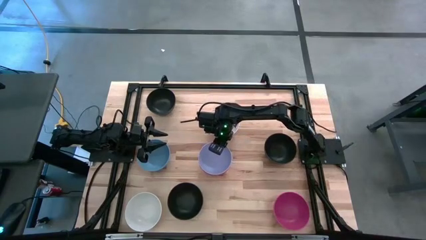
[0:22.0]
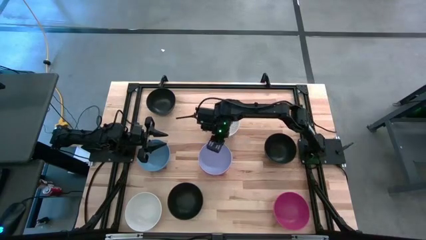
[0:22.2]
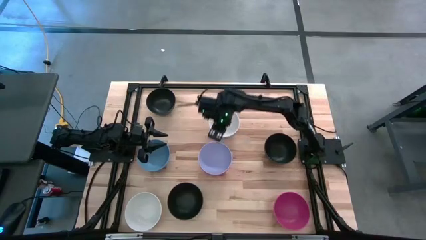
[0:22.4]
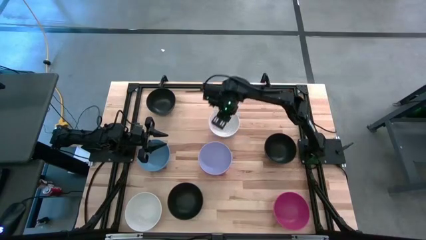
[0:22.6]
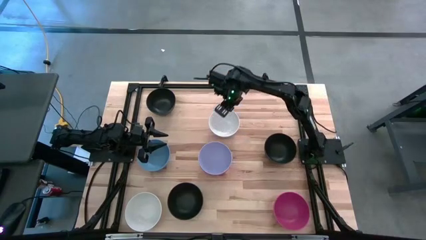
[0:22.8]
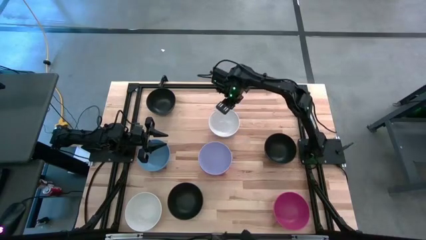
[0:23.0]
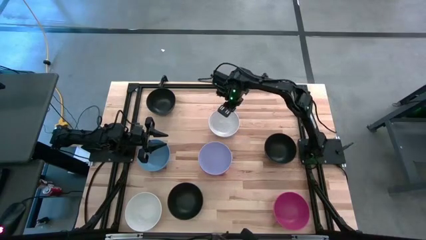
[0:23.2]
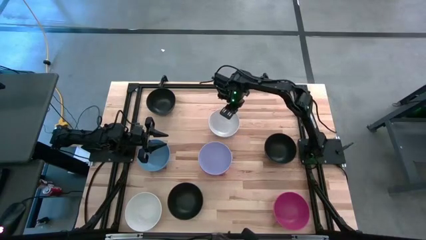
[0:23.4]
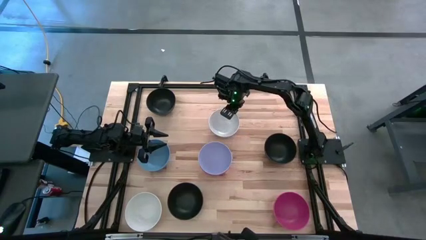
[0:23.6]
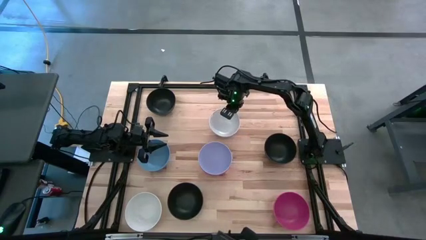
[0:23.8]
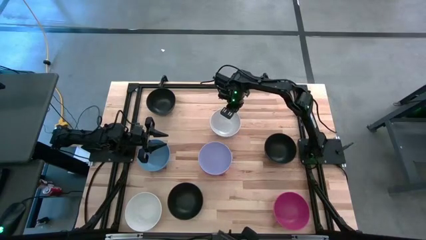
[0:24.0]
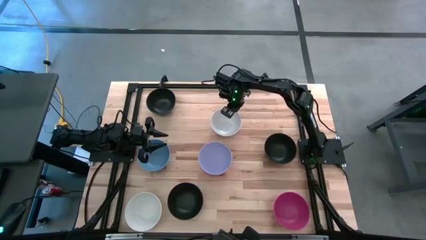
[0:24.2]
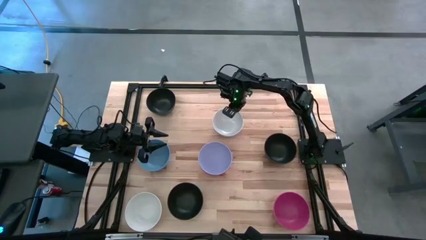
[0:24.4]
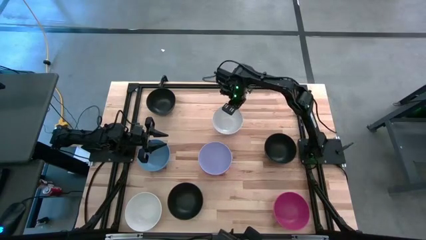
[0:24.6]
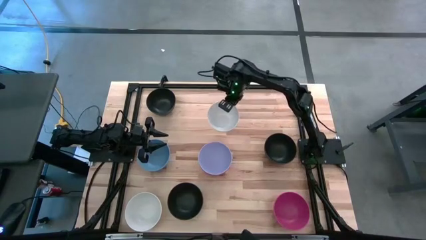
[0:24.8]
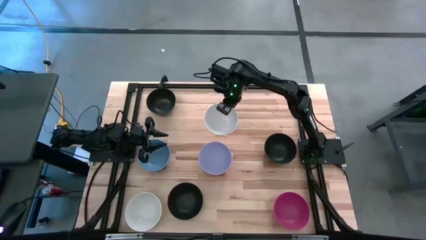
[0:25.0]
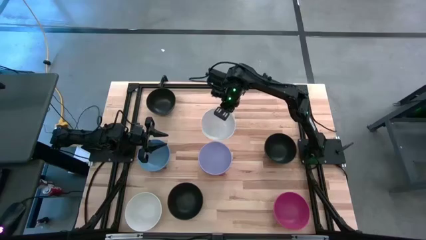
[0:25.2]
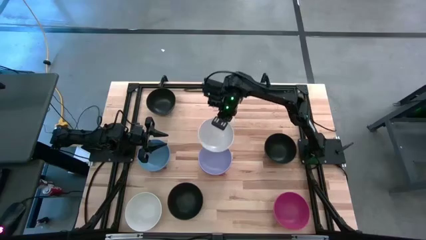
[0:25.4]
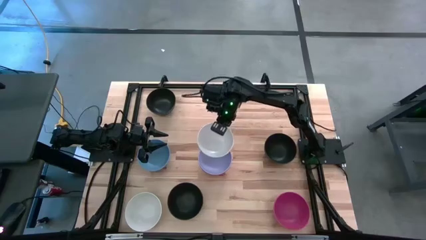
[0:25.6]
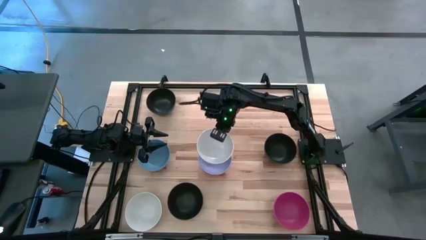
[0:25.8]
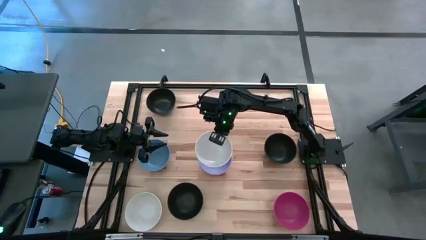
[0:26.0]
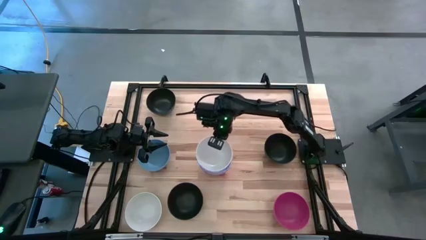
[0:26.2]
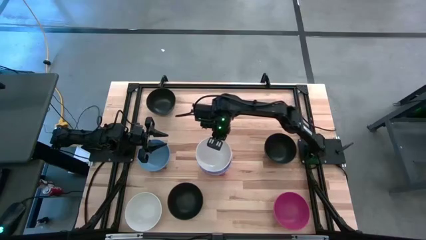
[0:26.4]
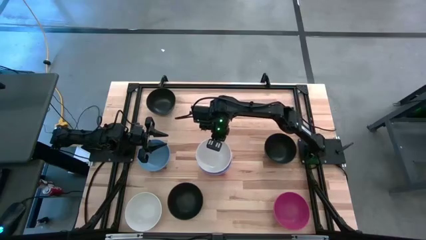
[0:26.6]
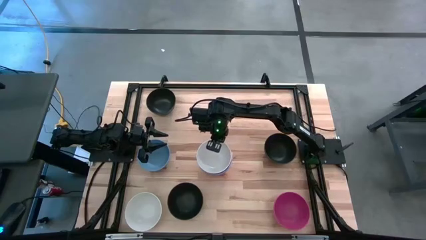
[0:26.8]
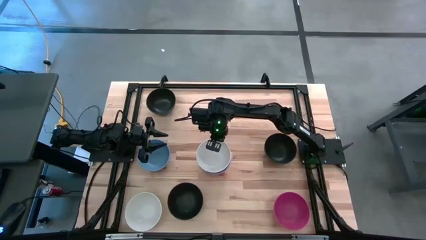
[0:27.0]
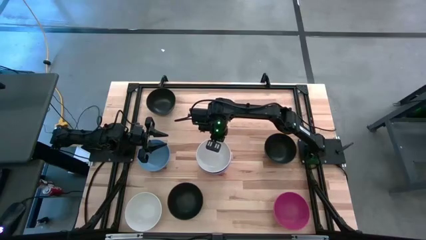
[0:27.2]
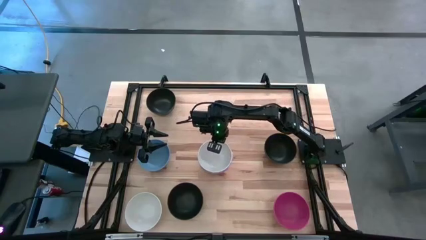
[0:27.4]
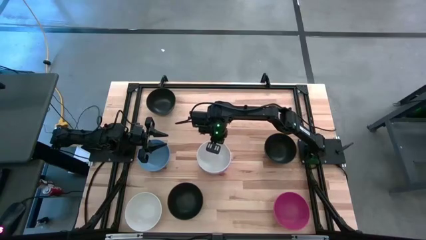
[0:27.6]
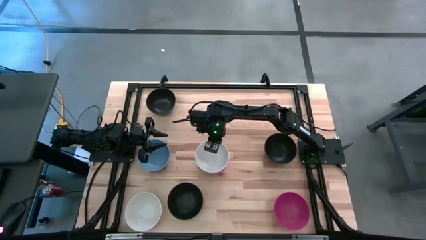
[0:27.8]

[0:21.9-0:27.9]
Task: Nest bowls inside each other
Stack the top white bowl on the purple bowl

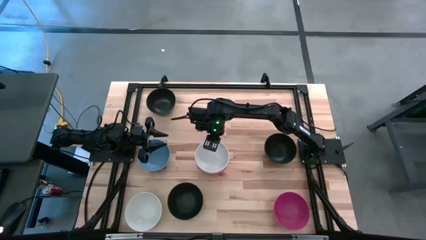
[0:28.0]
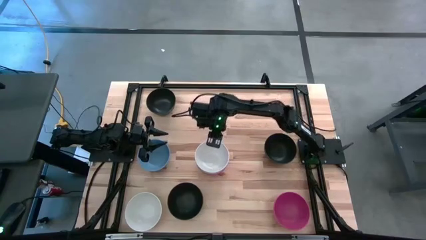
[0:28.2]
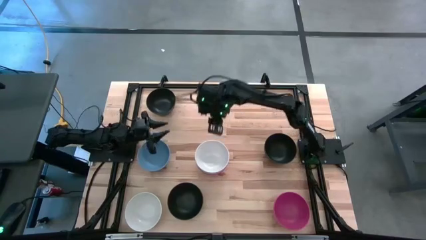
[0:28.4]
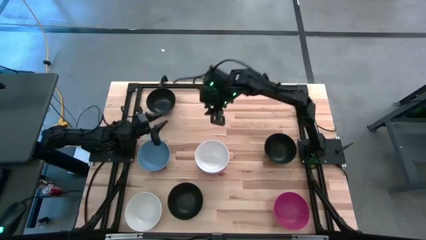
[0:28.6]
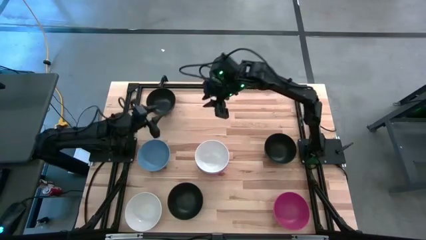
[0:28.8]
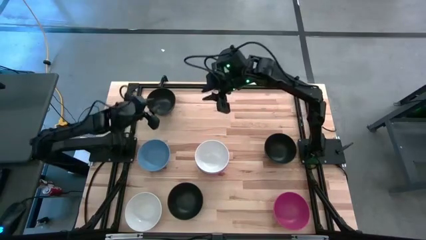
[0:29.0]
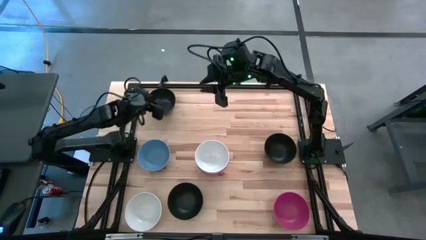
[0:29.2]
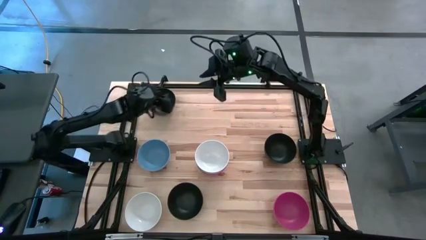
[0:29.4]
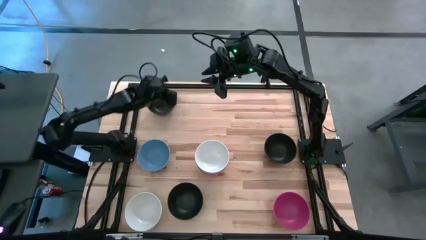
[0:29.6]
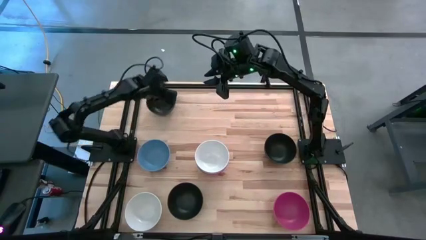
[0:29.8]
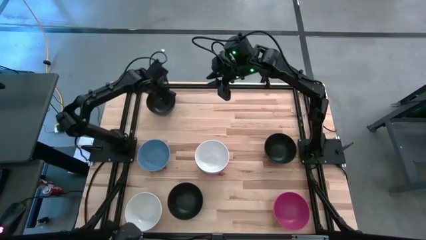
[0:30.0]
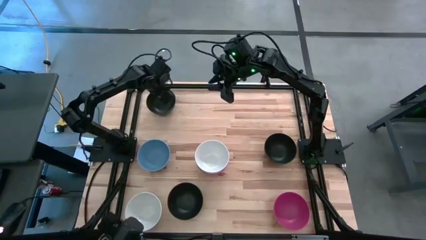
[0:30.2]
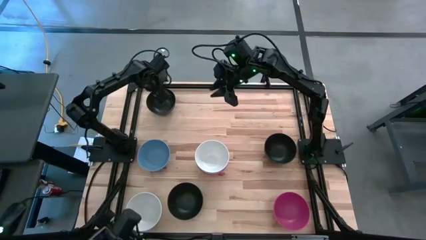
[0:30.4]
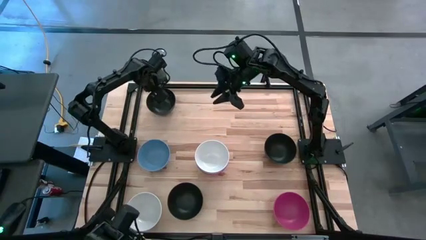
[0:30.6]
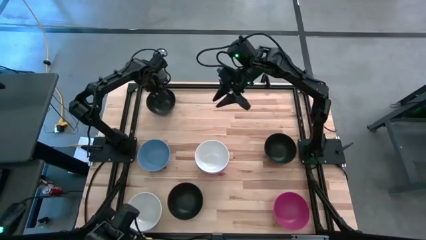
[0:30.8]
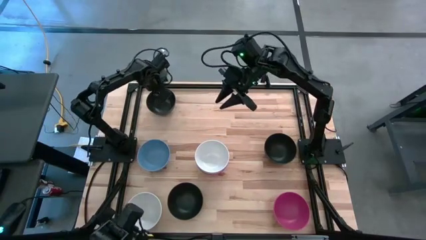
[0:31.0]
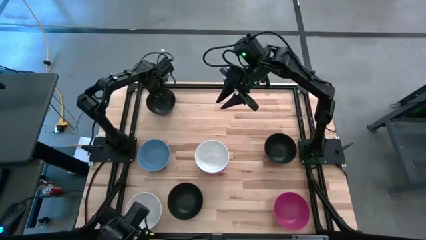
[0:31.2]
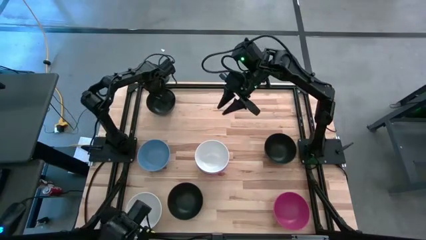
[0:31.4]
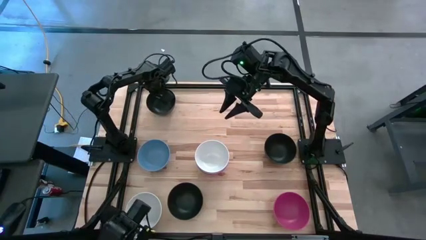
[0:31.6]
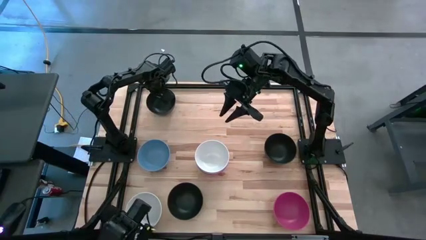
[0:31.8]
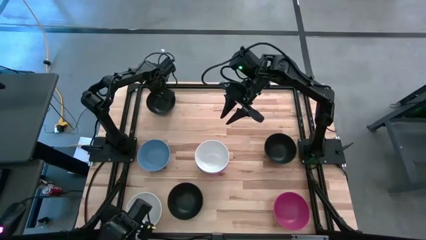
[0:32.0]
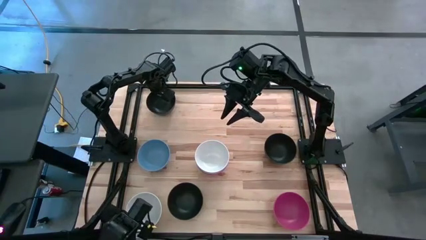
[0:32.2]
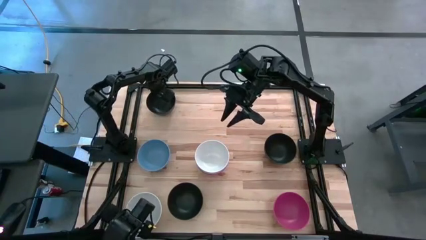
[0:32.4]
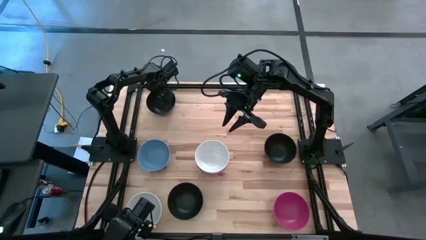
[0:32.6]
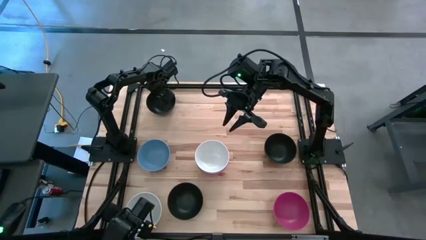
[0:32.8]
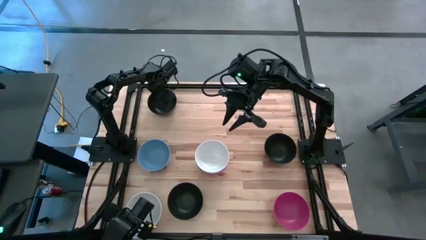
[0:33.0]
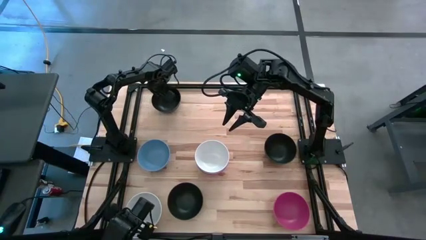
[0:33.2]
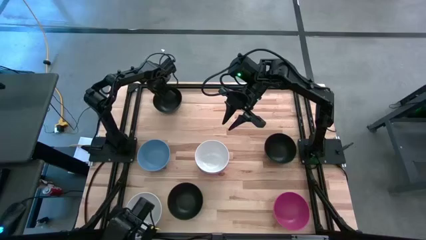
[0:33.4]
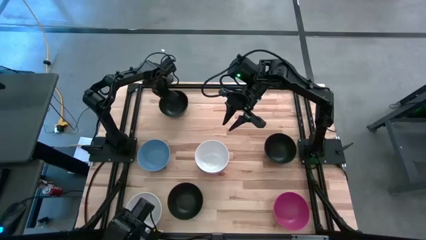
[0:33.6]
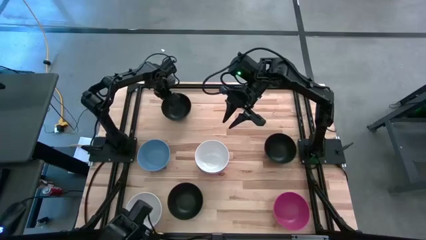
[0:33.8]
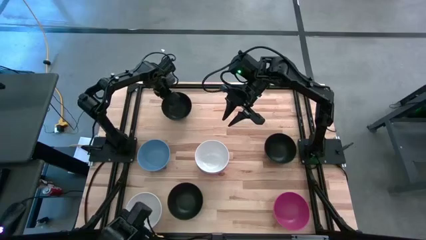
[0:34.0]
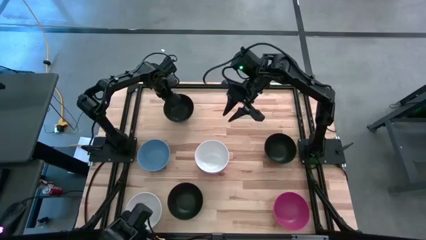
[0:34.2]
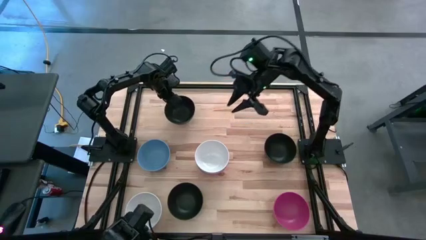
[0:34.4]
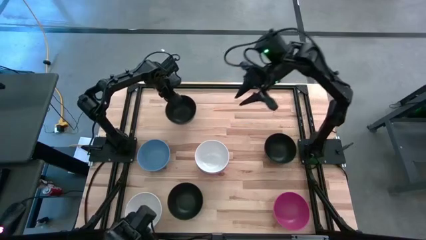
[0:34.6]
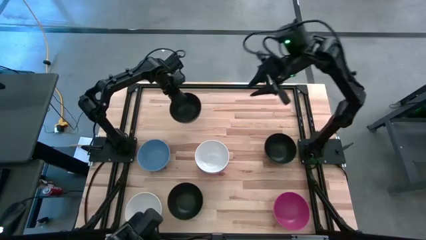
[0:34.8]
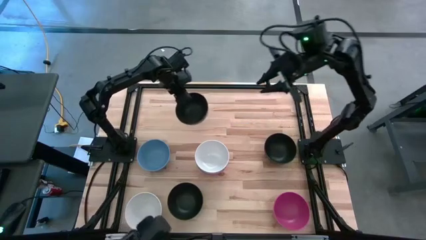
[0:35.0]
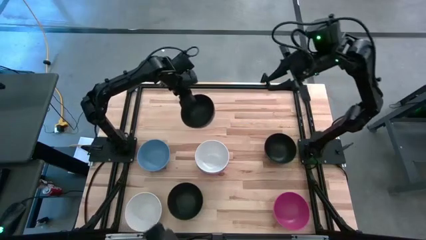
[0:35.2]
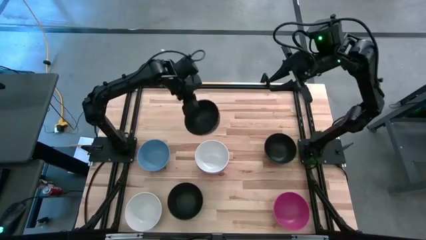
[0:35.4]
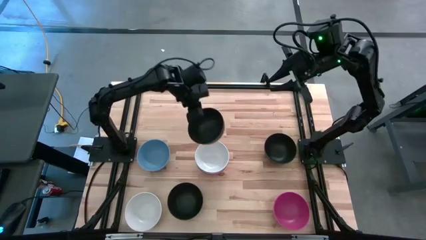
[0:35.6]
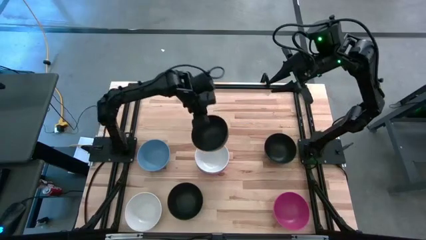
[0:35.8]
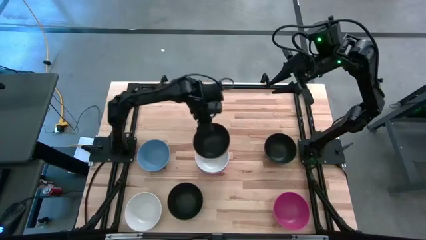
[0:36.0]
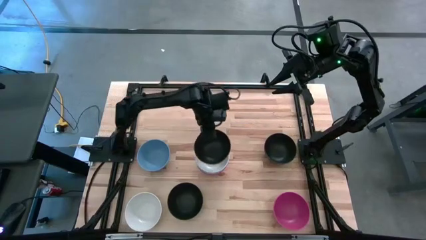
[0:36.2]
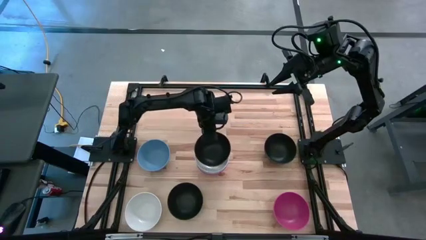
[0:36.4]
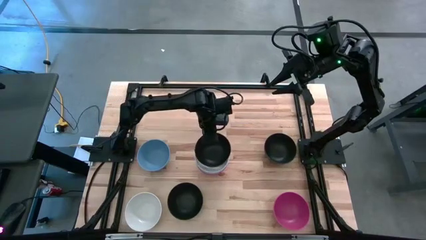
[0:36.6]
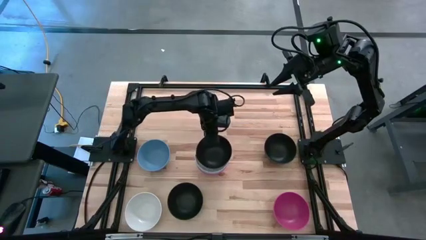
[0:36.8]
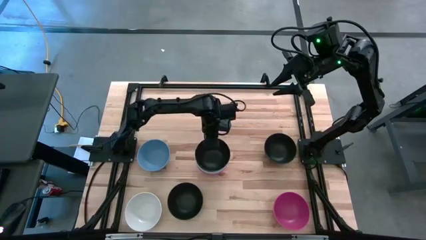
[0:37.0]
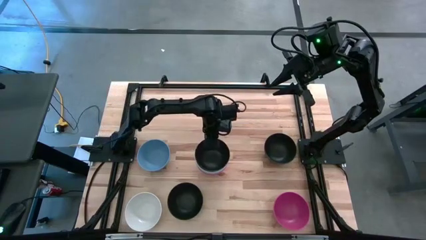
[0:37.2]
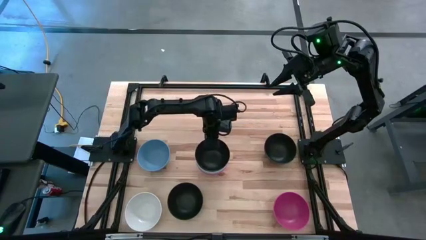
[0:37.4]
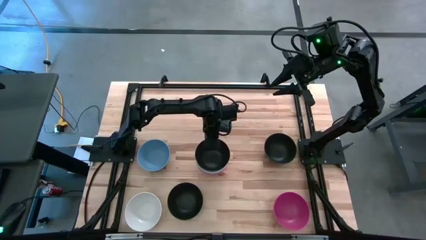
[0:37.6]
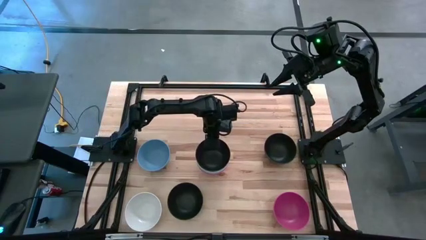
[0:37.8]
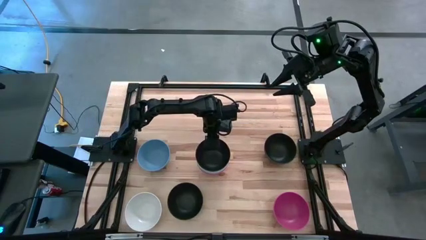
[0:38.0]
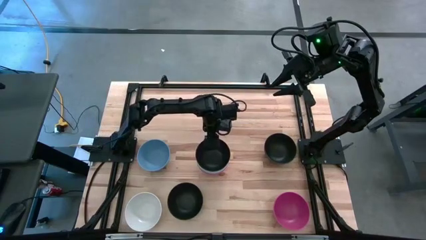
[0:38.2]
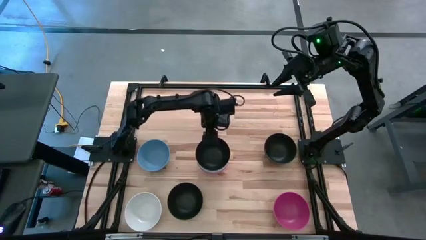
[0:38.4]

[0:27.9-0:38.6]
Stack the top black bowl on the white bowl
